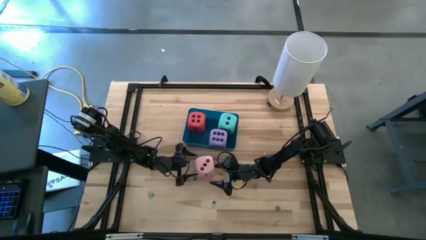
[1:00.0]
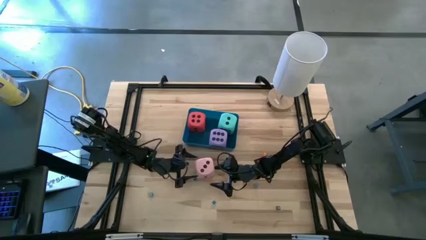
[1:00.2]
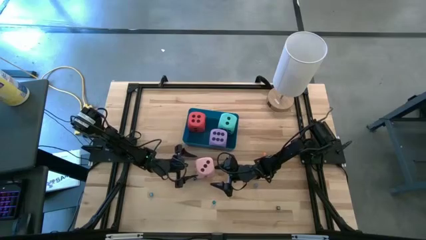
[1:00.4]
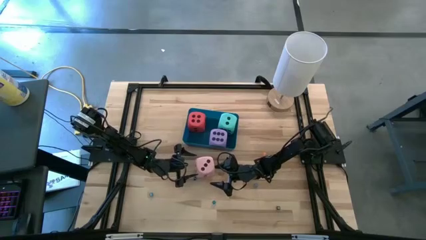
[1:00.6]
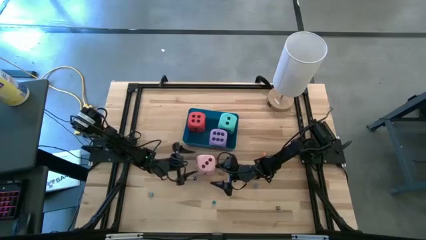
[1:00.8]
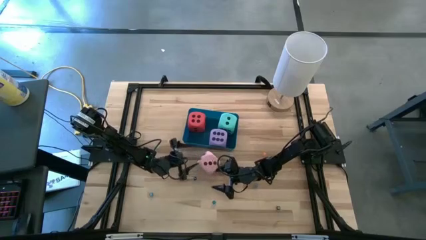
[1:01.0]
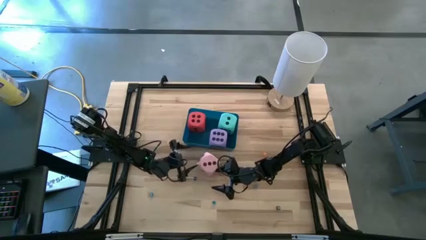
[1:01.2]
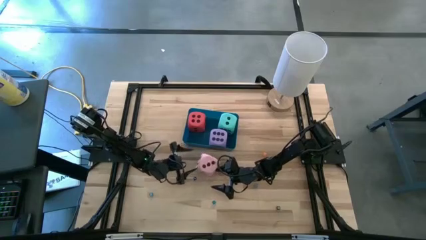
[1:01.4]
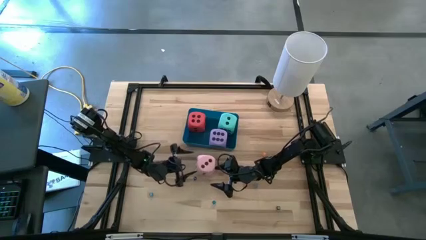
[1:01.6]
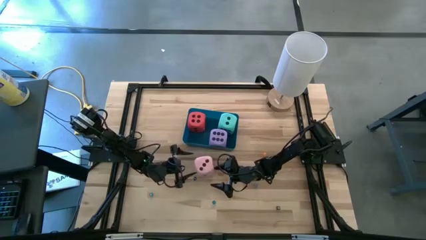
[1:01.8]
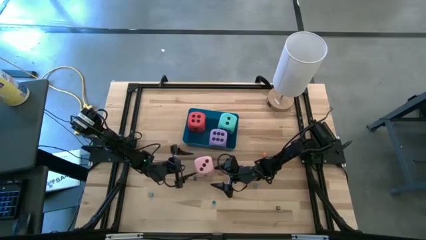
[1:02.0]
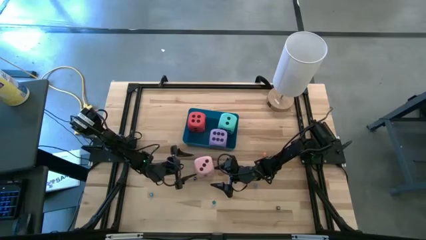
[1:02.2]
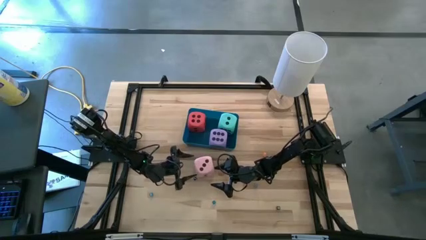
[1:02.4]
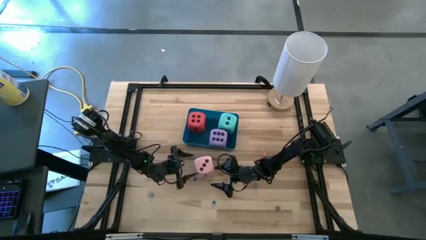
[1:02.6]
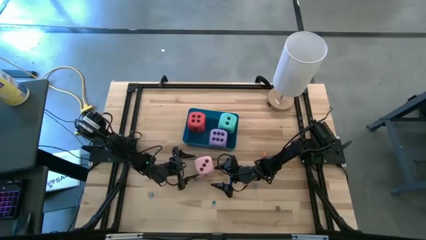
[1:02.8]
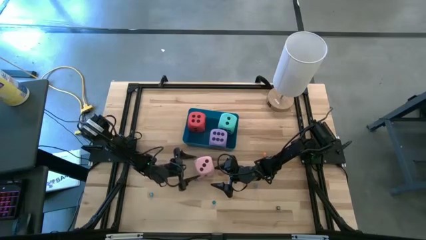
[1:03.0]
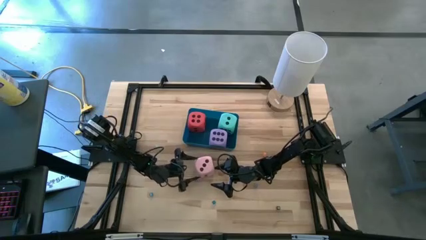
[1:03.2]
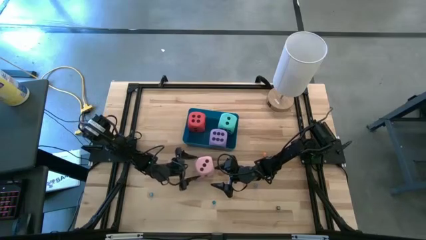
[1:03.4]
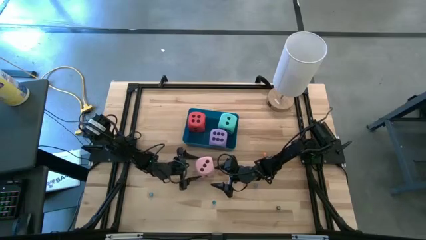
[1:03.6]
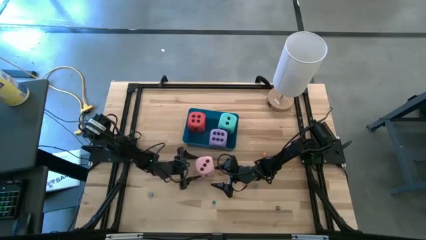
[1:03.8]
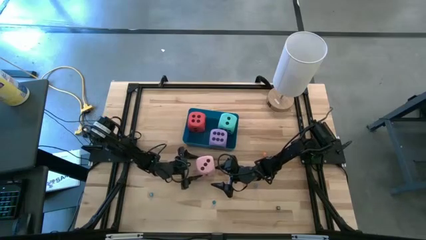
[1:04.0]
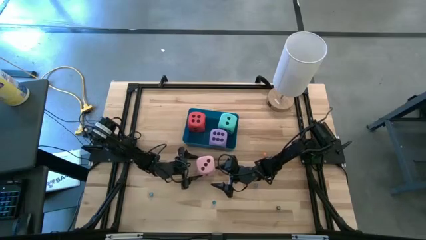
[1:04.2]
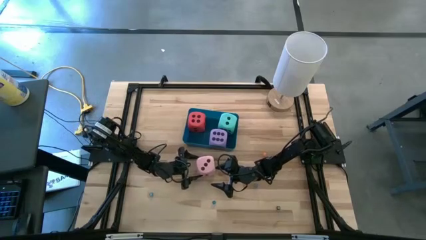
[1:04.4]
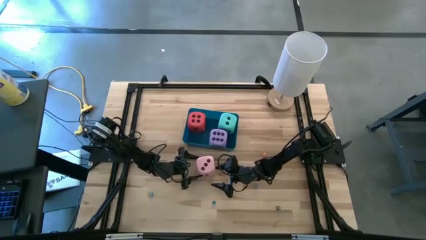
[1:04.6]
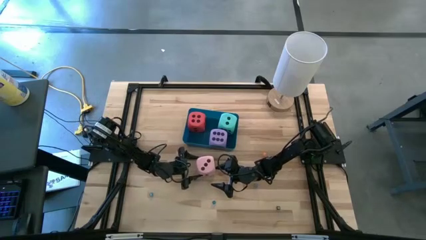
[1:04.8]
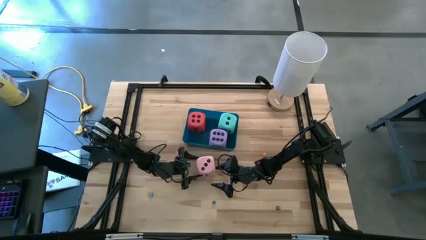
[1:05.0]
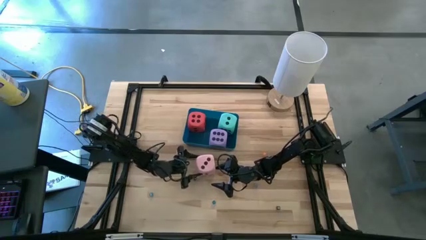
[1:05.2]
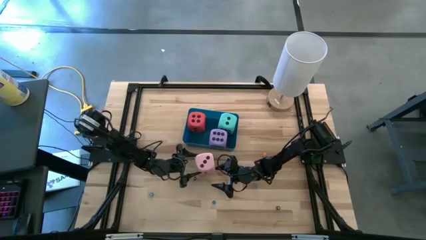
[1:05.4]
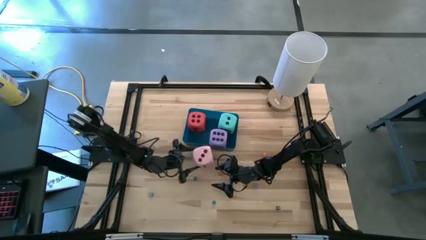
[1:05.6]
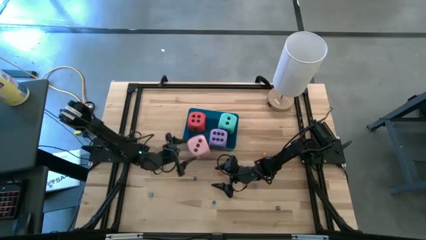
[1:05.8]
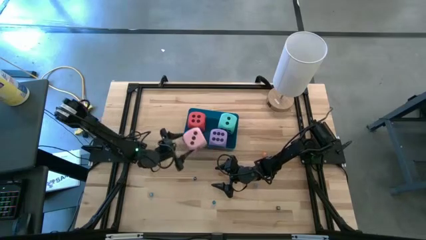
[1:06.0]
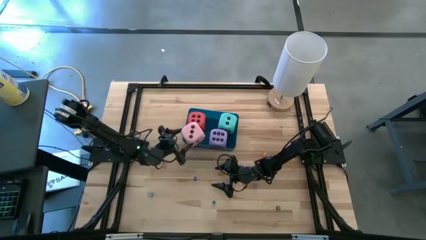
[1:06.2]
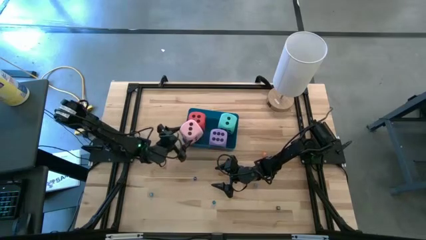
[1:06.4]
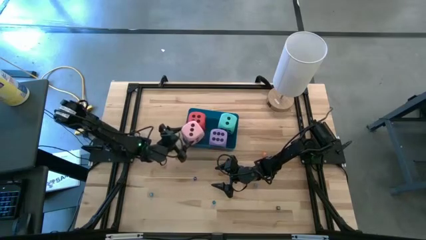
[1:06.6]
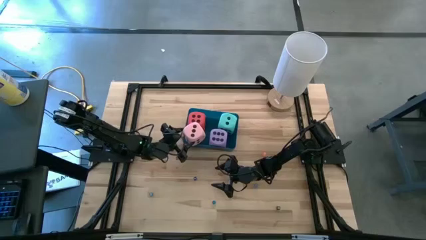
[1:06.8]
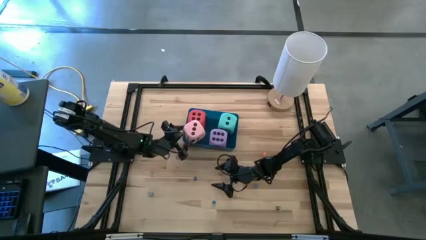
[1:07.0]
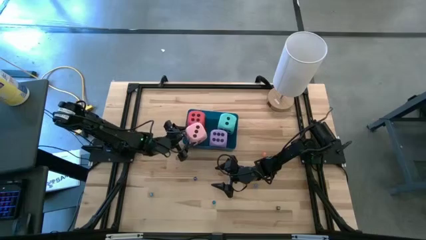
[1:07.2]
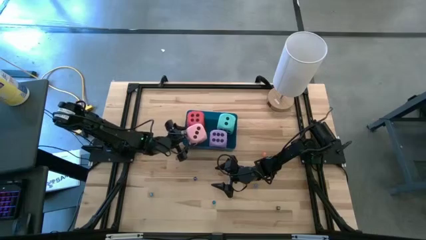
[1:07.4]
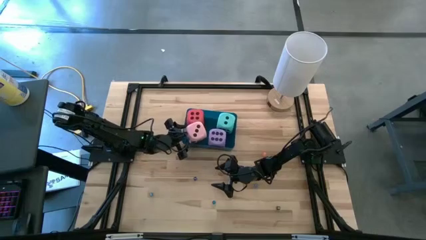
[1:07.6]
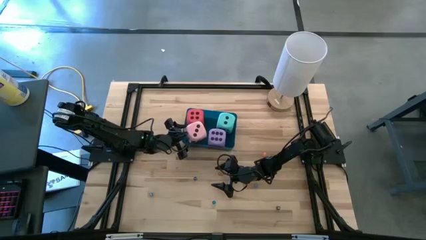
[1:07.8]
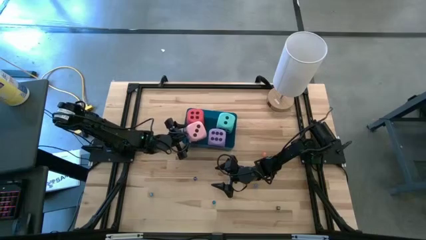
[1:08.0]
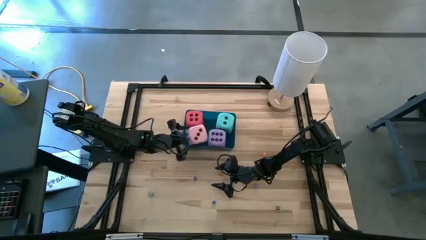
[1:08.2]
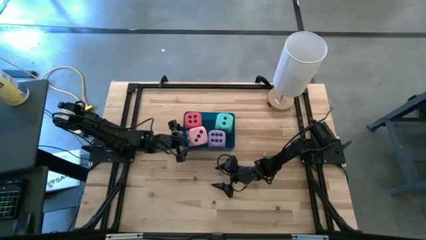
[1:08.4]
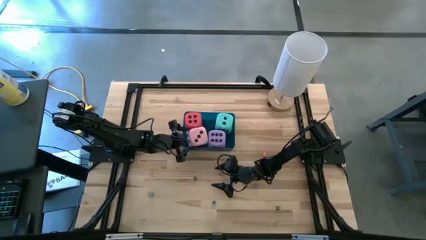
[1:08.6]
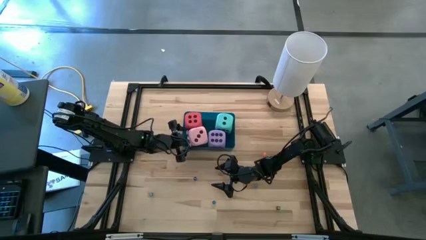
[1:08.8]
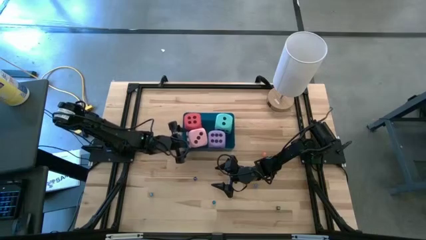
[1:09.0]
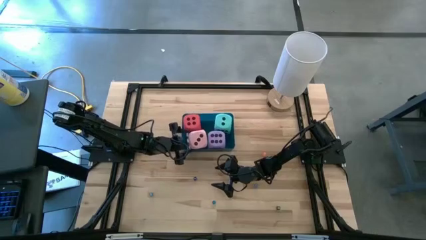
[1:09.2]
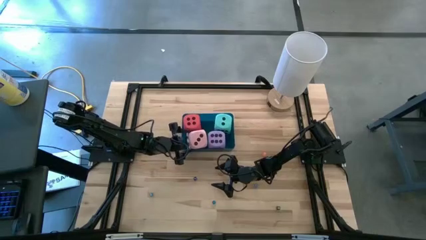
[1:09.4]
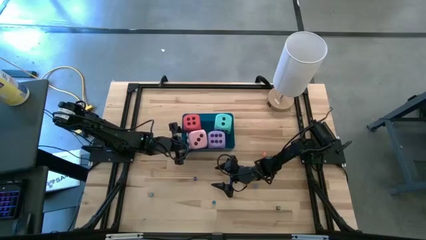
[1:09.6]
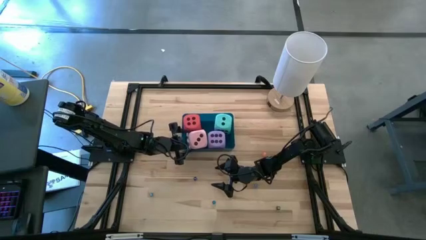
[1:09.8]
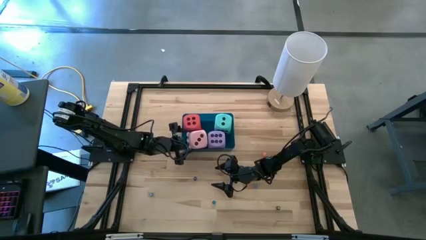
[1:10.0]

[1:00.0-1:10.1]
Task: Pick & Place Dice
Put the pink die into the blue bin
